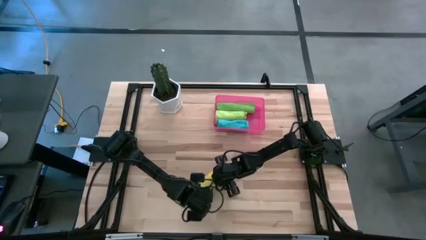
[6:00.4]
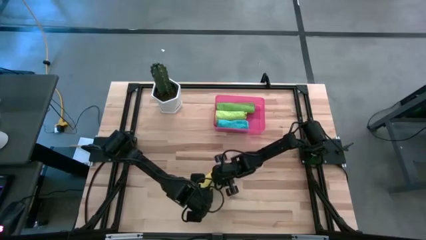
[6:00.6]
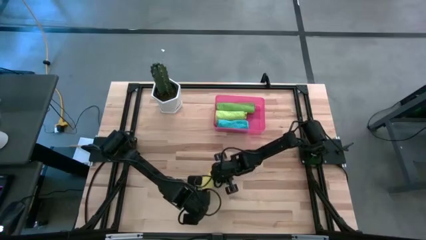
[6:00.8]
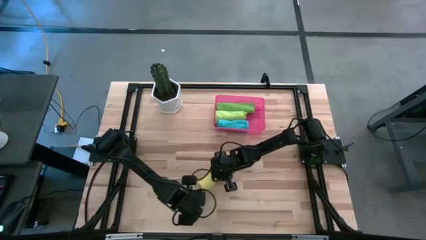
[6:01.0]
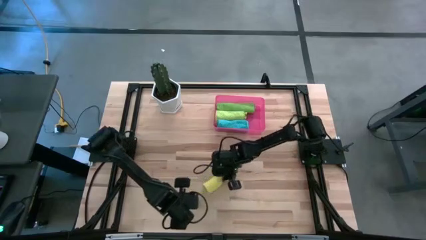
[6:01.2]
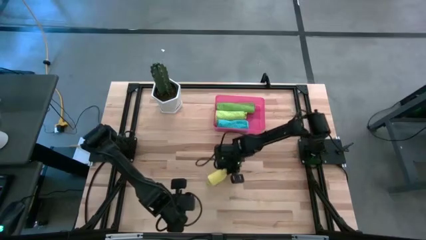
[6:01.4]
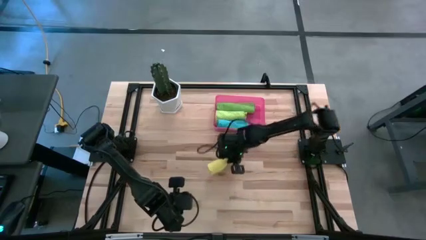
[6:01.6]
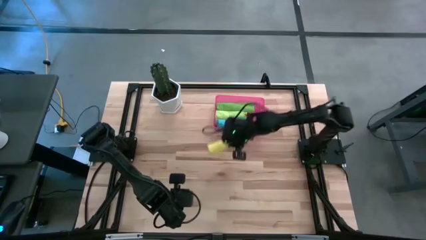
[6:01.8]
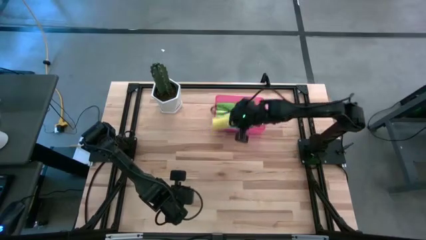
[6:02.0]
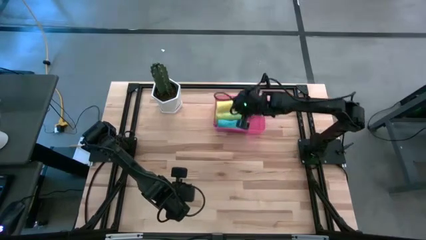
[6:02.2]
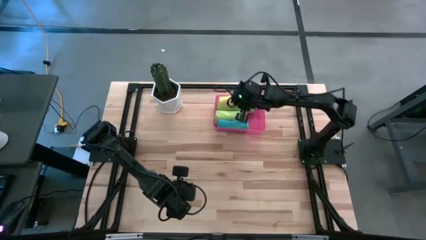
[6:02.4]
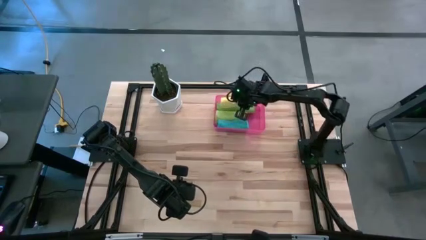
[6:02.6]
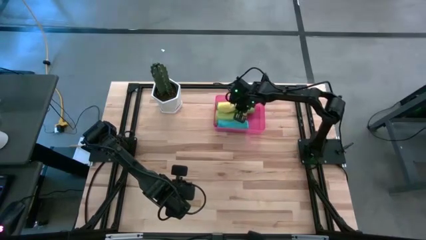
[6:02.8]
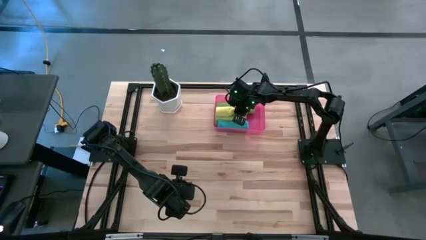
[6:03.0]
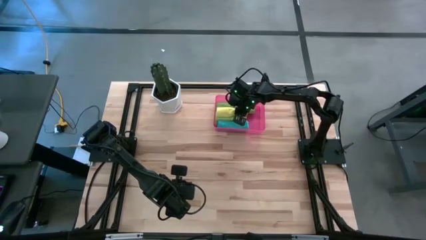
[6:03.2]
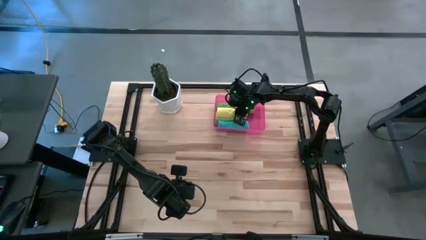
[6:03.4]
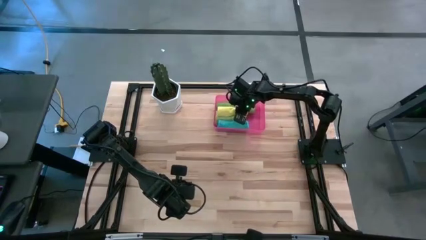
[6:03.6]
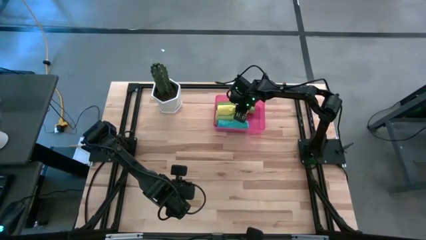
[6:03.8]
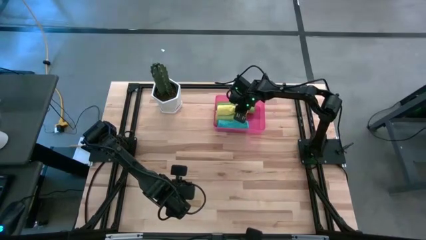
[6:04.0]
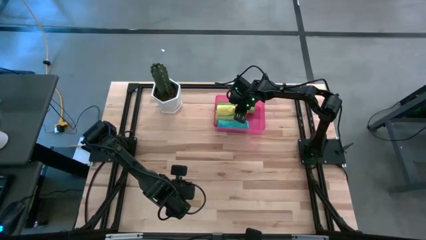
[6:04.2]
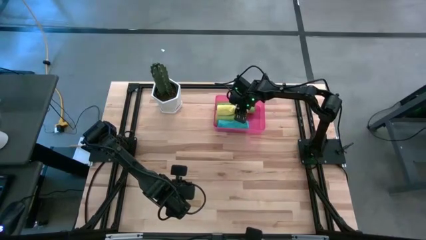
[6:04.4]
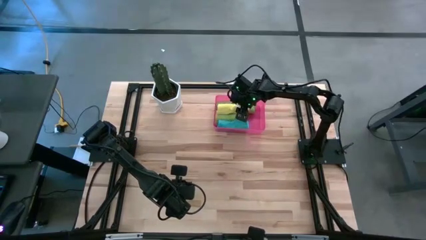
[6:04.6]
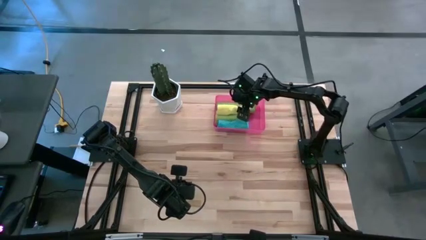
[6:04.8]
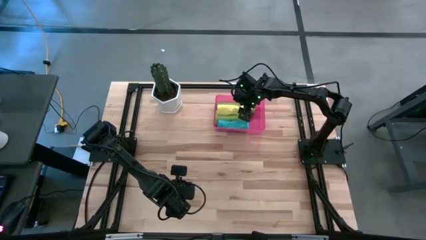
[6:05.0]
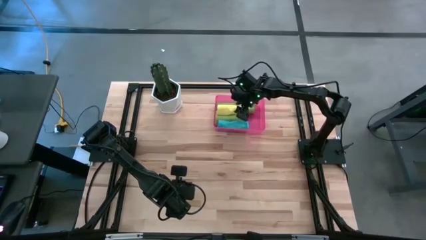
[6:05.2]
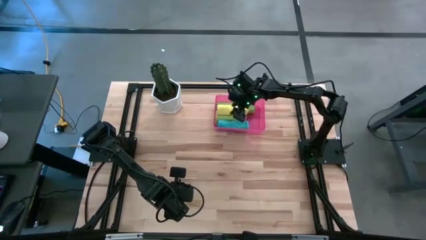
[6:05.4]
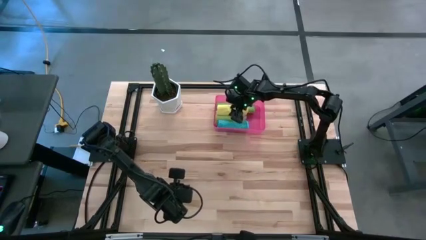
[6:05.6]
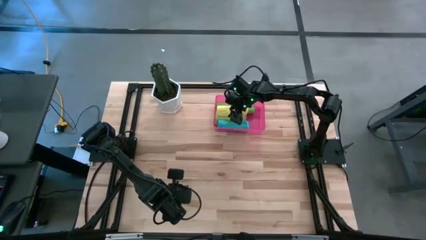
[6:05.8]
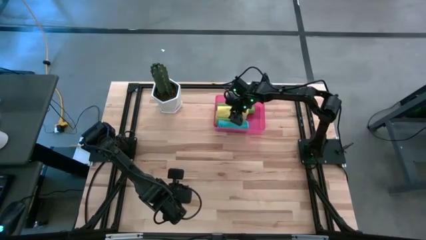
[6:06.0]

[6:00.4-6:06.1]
Task: Roll microfiber towels into tight, uniform cylinder then place into a basket
Put the yellow microfiber cloth into the pink bin

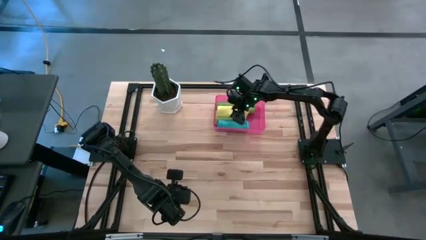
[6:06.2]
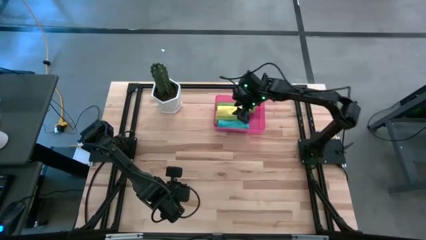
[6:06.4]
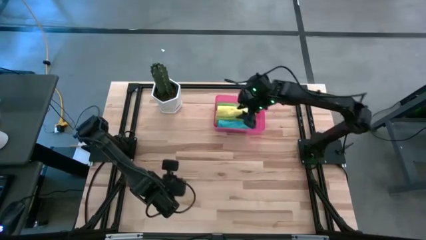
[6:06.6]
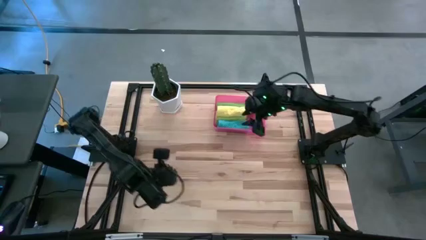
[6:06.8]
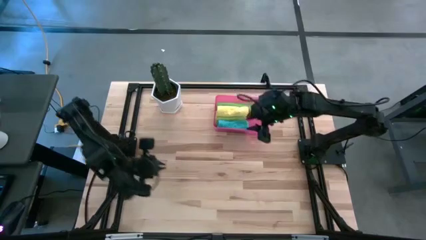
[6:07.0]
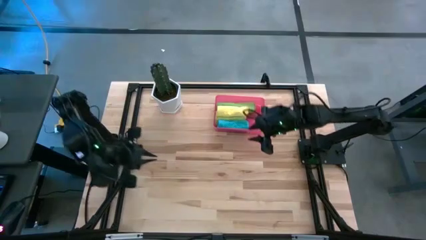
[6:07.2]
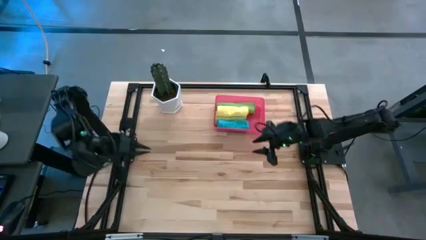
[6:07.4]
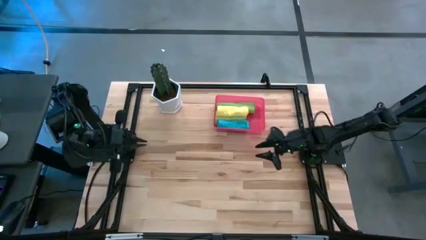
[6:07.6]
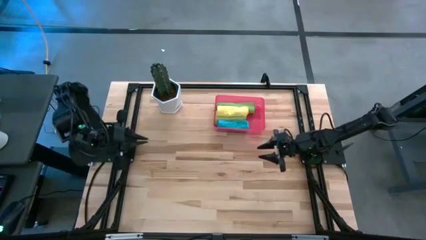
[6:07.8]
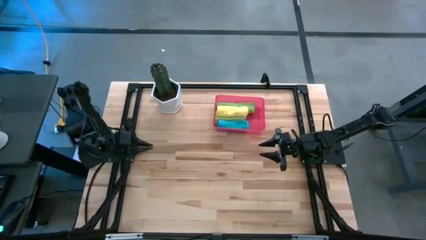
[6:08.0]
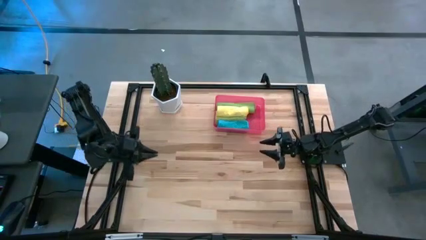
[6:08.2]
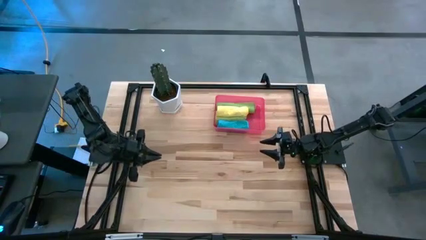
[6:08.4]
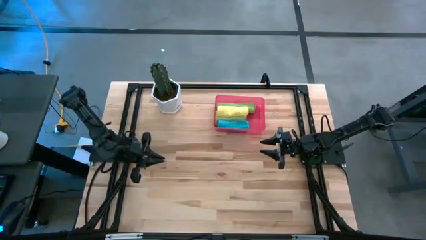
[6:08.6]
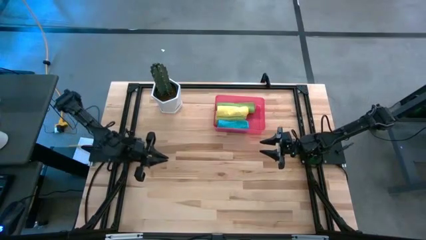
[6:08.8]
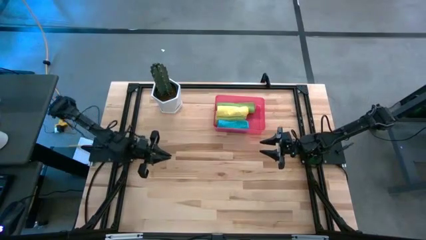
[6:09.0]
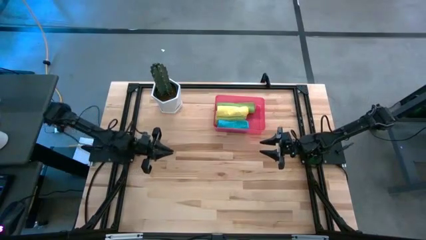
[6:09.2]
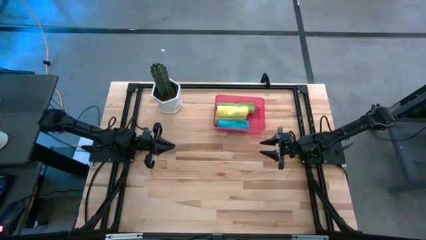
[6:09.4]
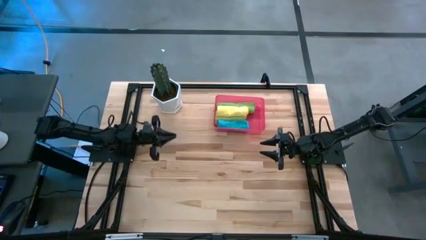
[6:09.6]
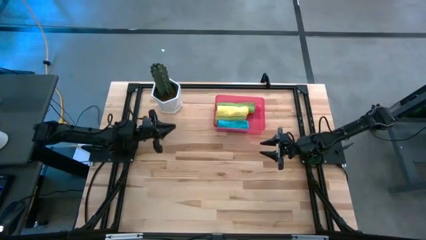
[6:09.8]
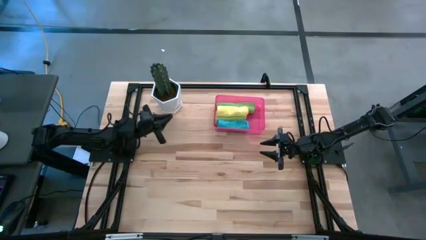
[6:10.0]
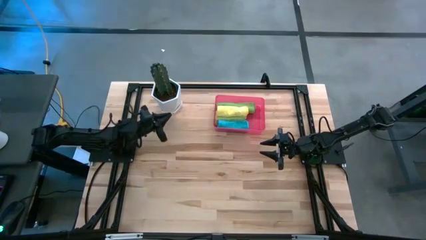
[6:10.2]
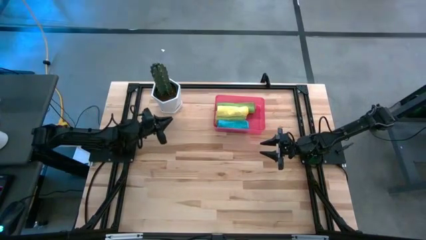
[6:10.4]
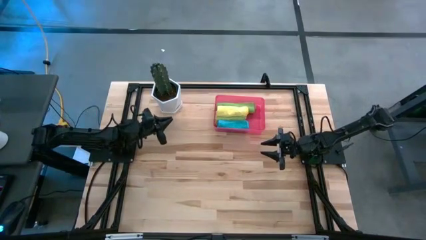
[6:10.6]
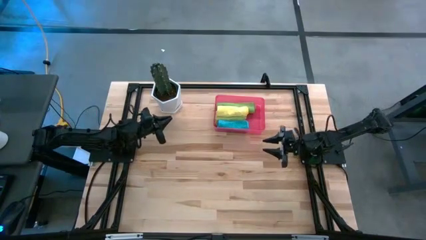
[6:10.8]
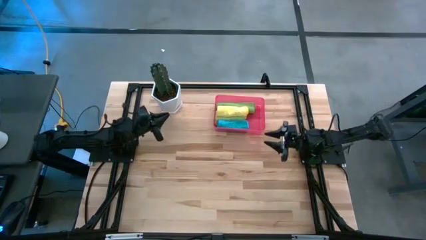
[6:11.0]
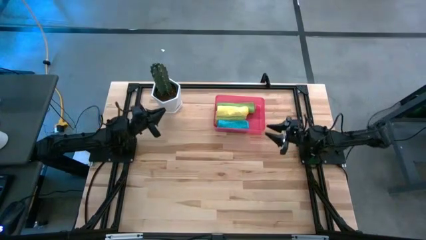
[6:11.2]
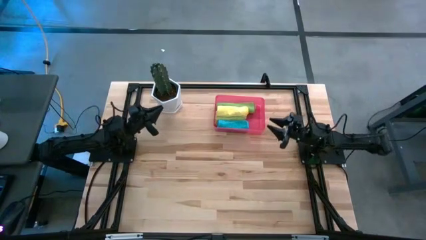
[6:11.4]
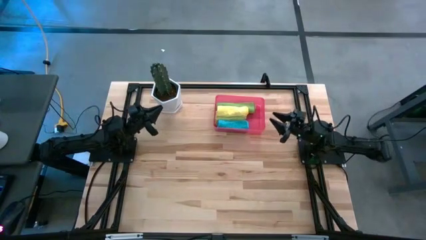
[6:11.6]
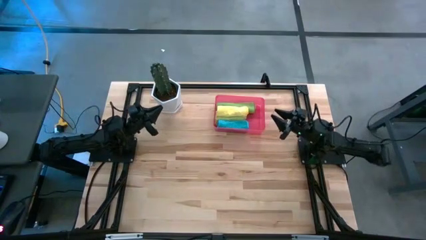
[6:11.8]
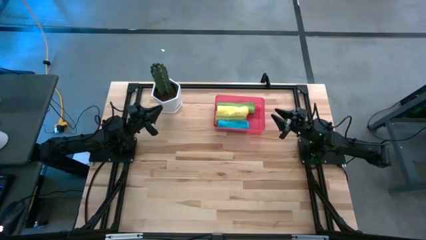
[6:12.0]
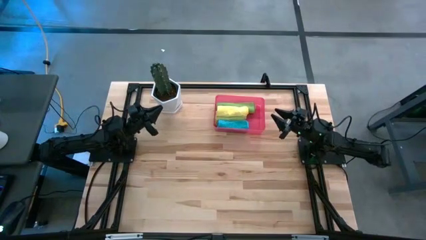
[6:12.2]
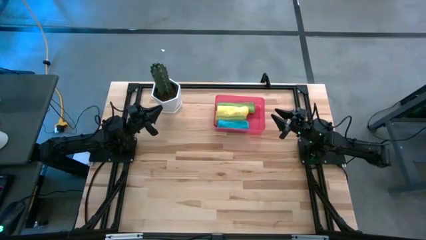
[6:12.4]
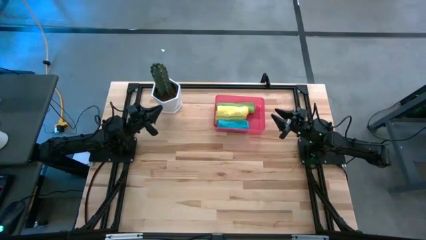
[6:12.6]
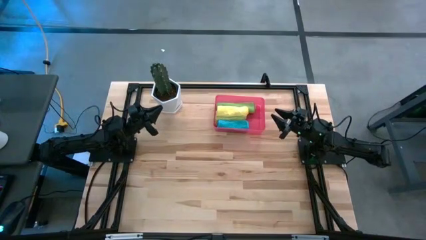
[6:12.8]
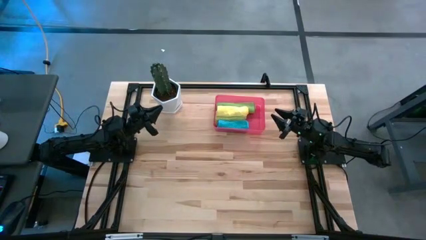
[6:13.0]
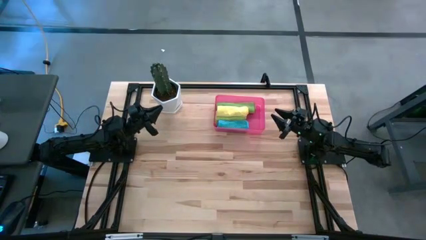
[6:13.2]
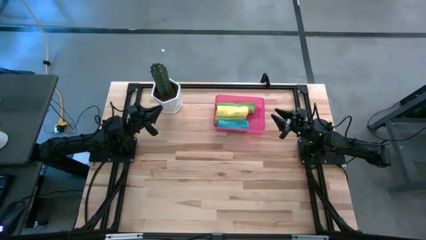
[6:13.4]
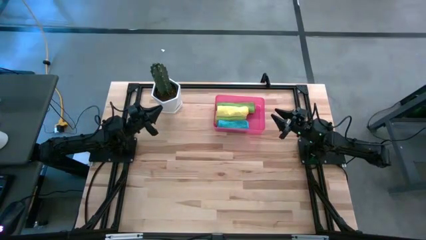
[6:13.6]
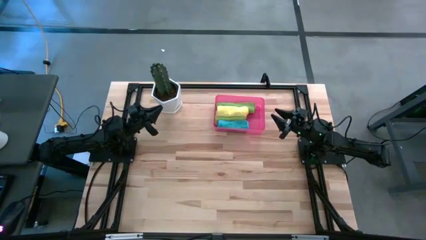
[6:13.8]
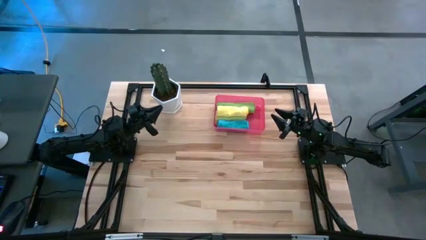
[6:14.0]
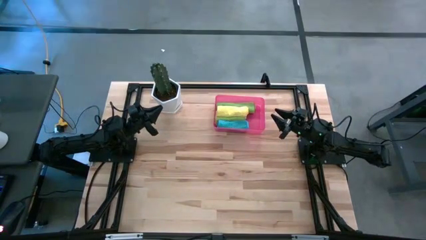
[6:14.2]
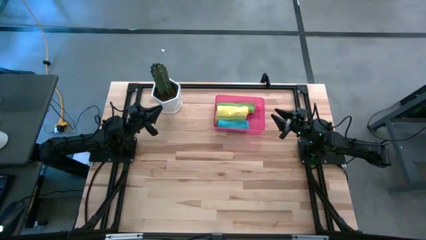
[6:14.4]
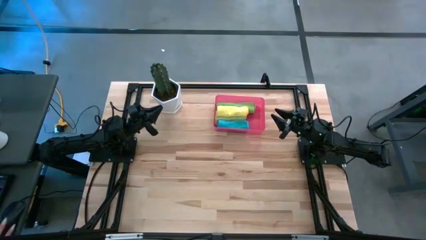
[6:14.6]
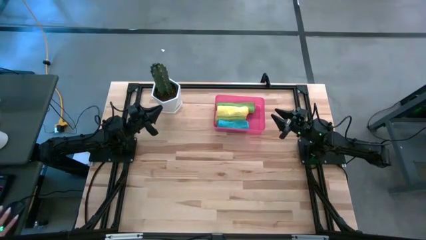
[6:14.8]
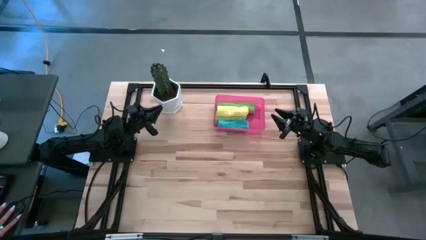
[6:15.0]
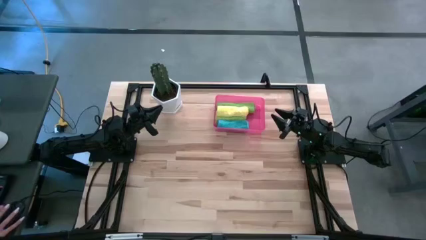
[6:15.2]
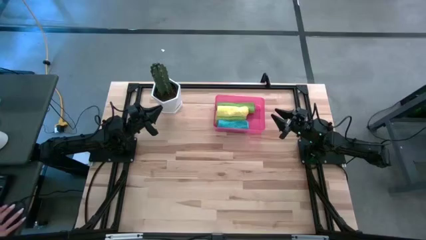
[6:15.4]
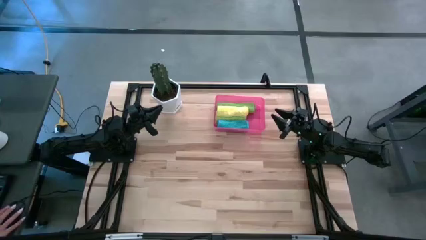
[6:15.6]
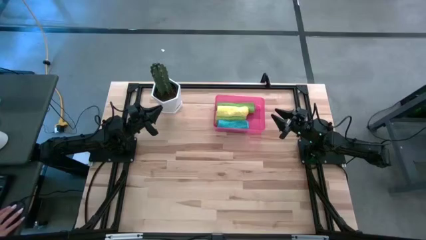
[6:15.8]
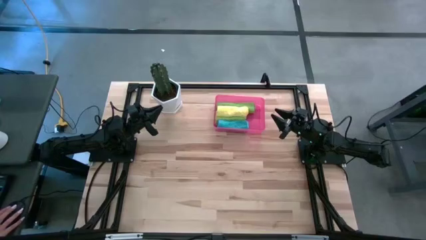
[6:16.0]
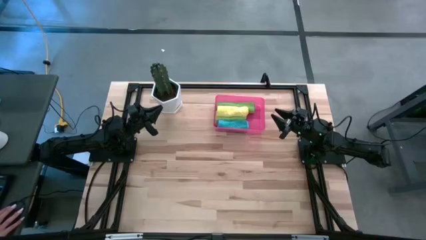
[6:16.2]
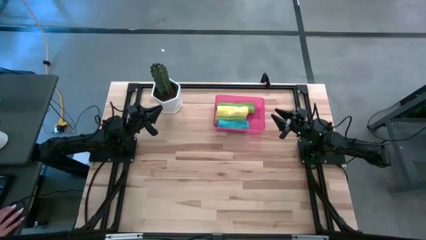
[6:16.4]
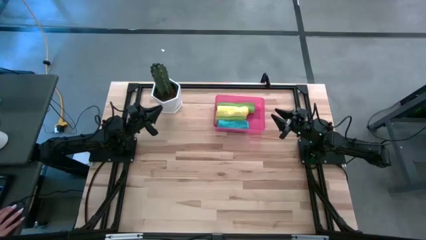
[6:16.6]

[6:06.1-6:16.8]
Return to Home Position
